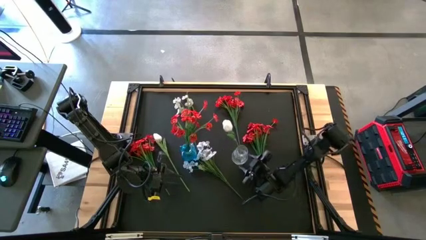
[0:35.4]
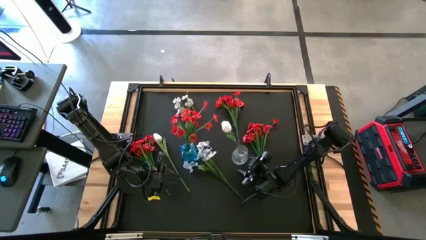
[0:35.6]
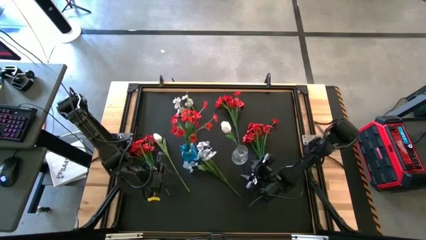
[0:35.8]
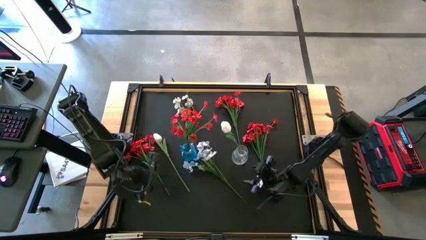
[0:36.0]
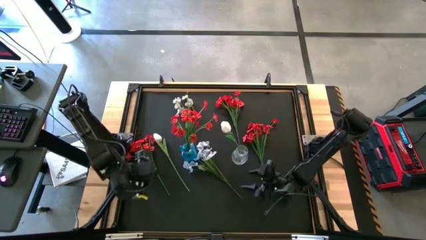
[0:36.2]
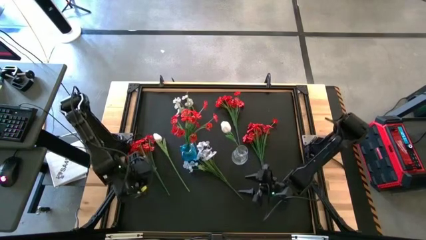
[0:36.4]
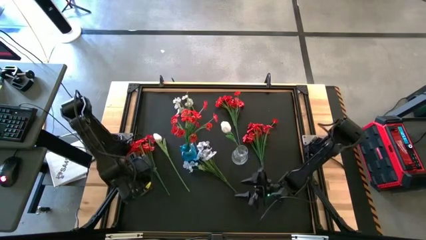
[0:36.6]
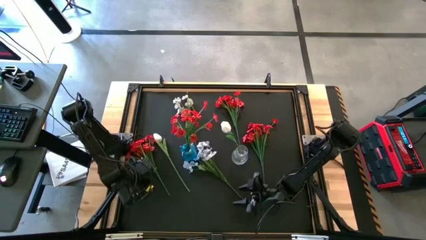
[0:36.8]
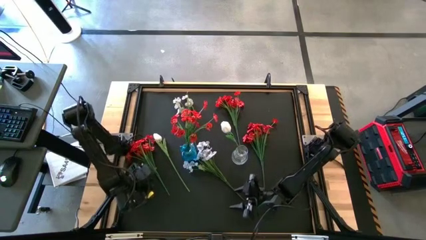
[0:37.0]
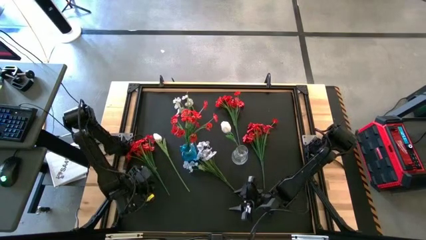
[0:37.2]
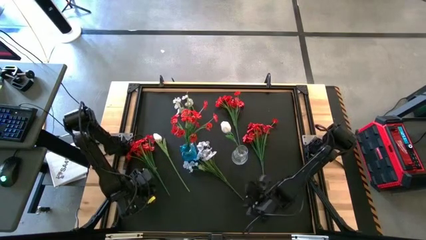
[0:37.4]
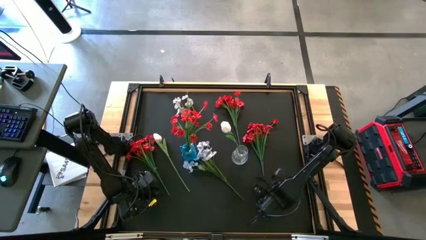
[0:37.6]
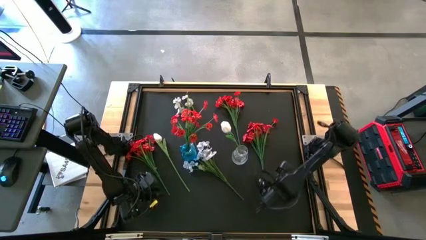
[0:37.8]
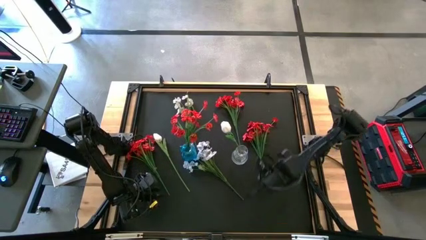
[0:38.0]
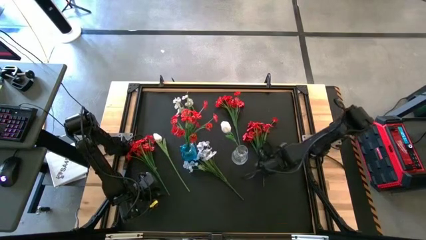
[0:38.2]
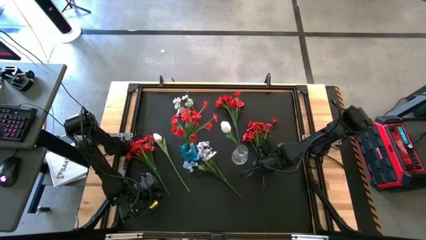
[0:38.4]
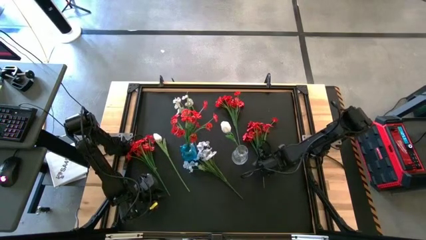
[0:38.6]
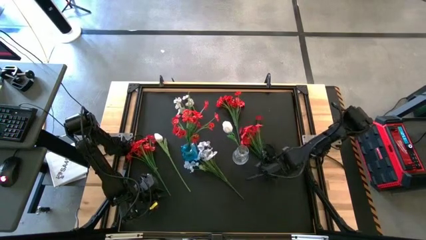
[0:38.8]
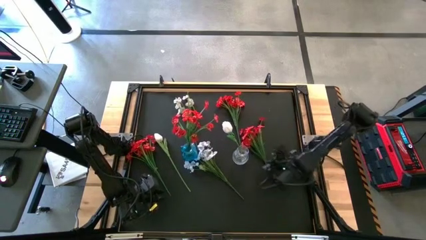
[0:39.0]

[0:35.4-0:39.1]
Task: Sort flowers into vase by color
Put the red flowers into the blue vase

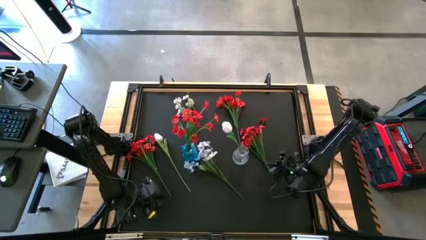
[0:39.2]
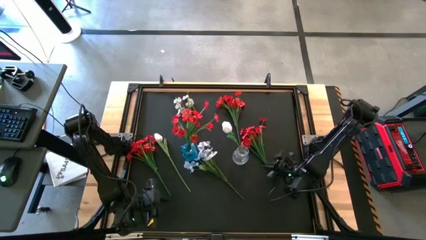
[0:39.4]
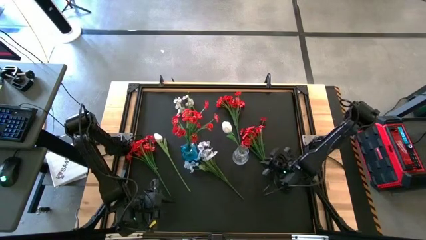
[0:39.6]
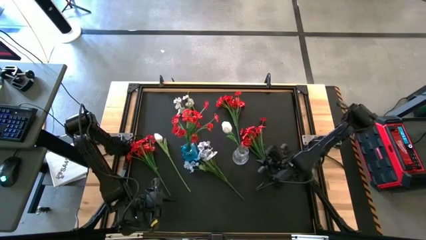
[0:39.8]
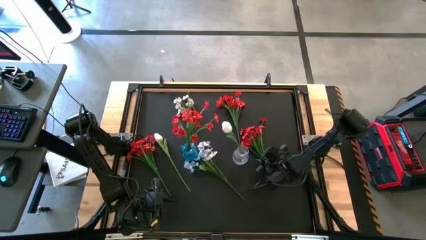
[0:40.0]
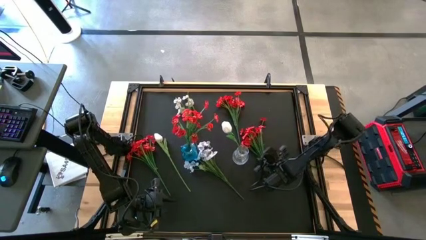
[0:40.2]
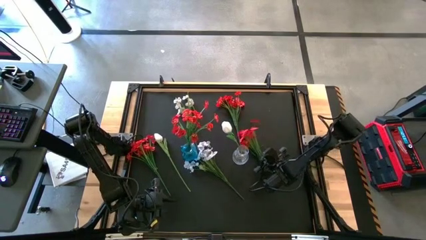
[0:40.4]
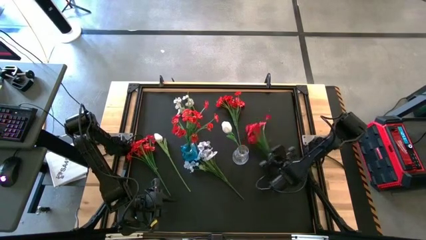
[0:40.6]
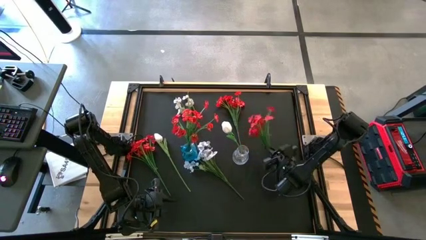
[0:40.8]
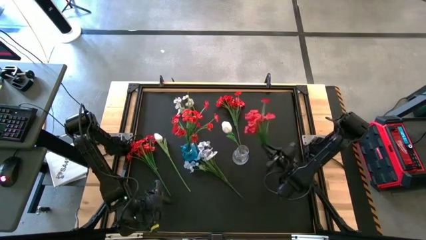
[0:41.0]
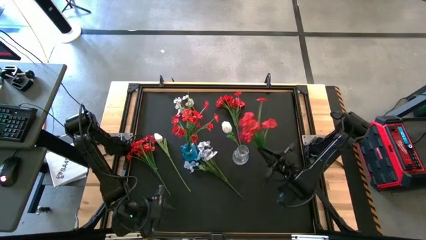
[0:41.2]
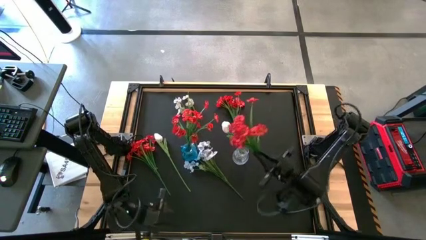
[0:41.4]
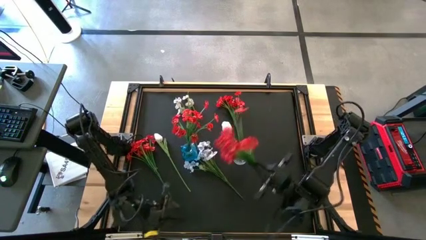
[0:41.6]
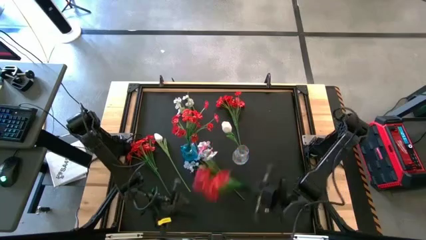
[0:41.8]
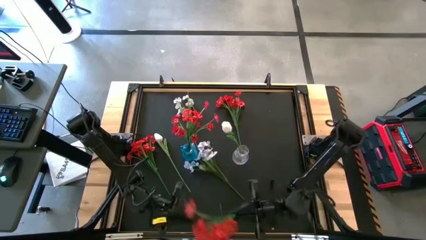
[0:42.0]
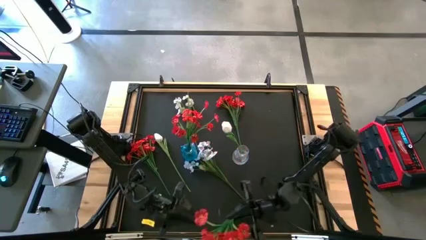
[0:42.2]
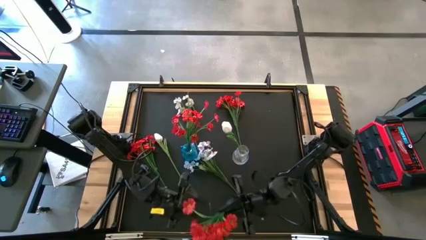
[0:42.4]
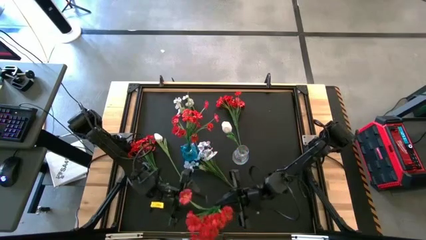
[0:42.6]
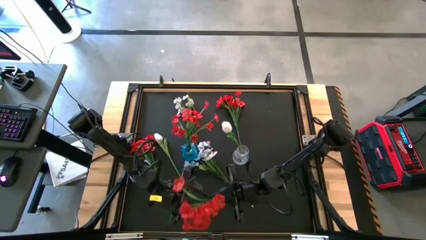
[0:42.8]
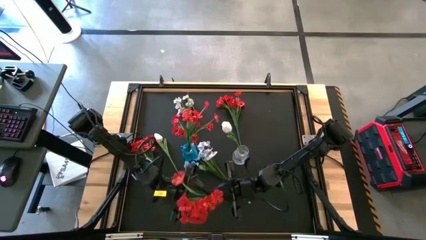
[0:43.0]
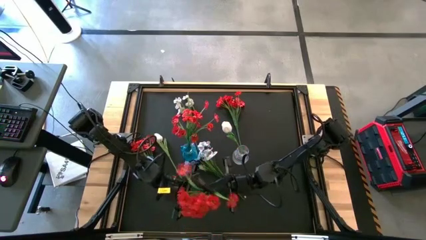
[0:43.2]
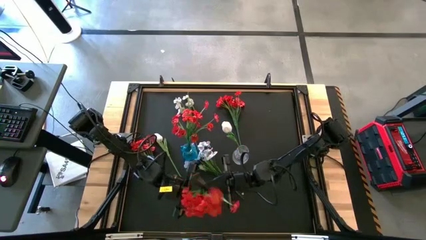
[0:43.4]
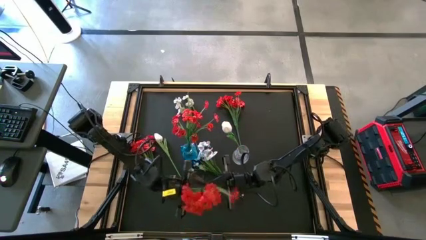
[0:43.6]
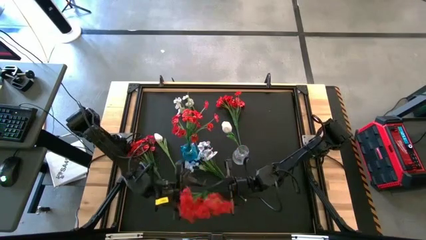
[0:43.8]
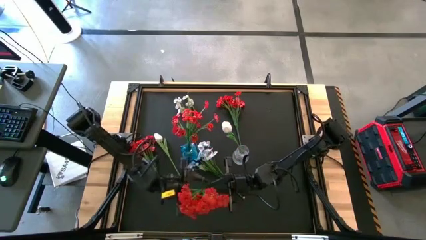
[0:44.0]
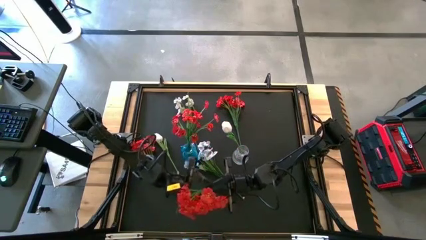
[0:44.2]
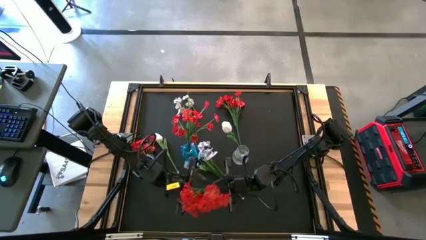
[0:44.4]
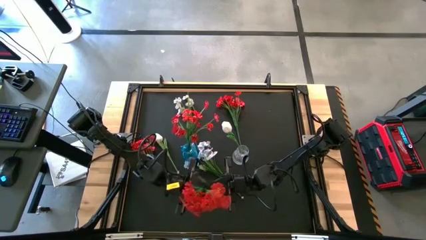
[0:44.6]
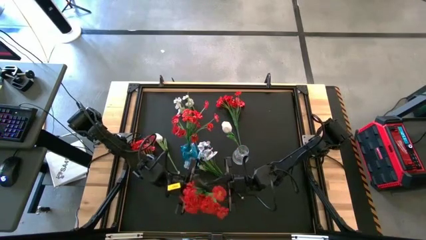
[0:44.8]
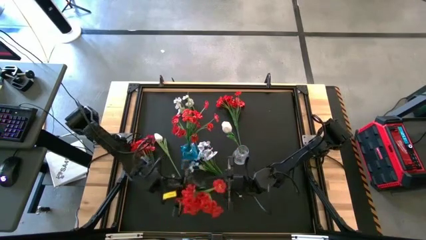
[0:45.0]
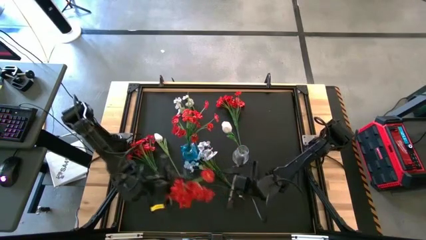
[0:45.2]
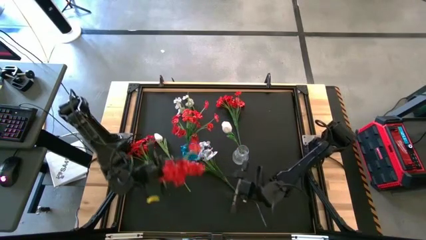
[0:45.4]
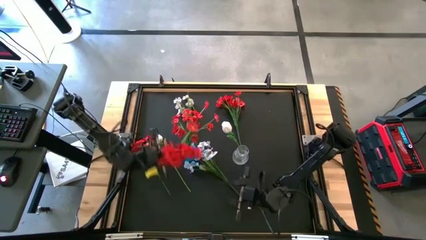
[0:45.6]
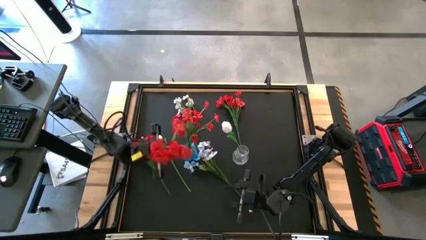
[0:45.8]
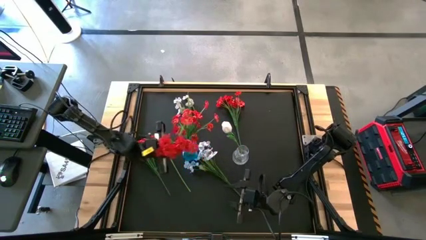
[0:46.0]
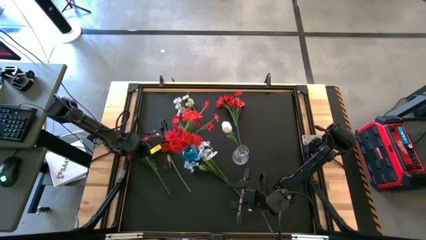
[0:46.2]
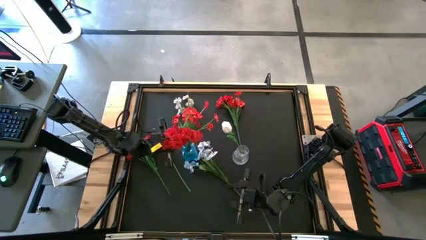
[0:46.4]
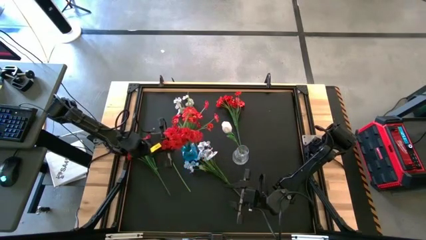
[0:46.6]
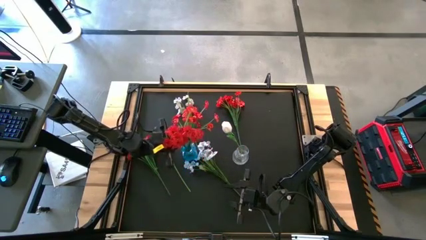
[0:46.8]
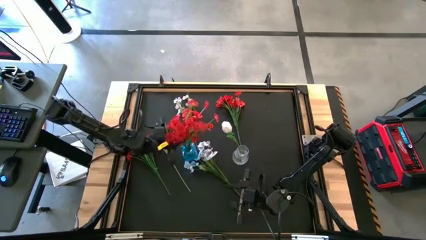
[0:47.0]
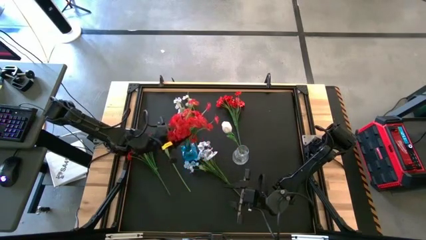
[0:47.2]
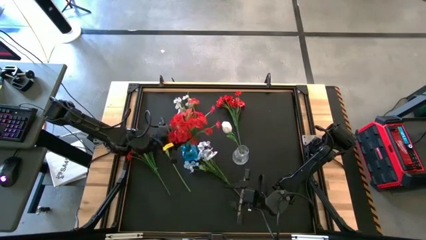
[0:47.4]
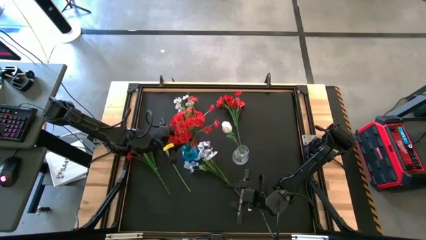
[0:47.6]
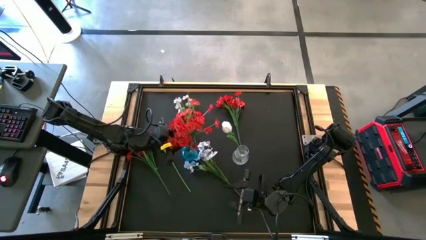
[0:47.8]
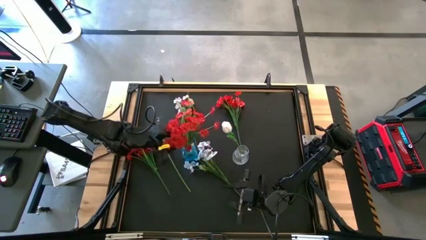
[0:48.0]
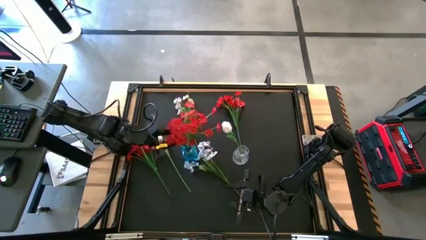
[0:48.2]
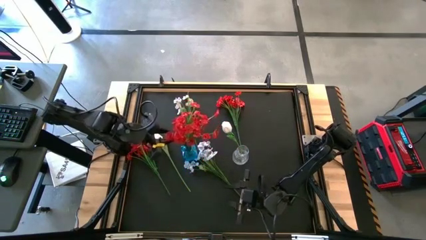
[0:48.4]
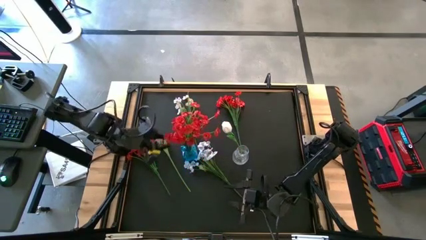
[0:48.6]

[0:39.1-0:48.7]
Put the red flowers into the blue vase

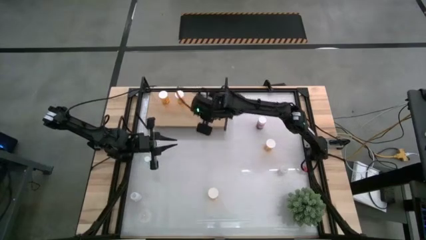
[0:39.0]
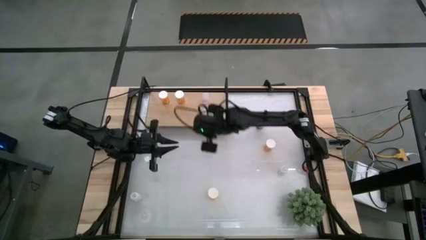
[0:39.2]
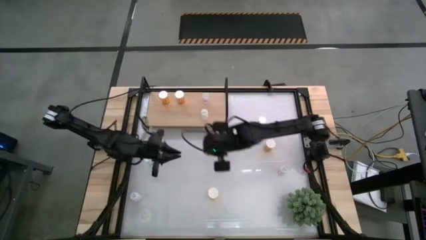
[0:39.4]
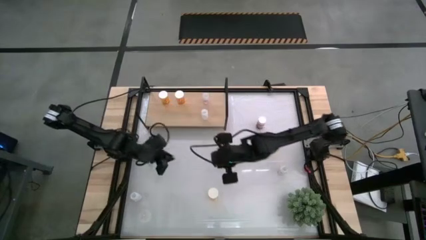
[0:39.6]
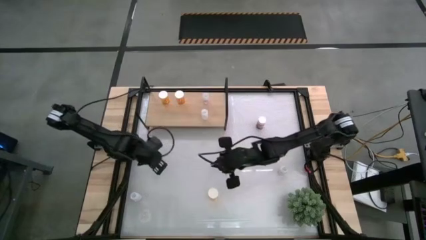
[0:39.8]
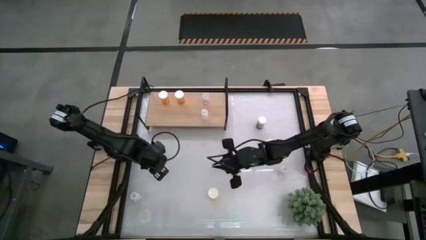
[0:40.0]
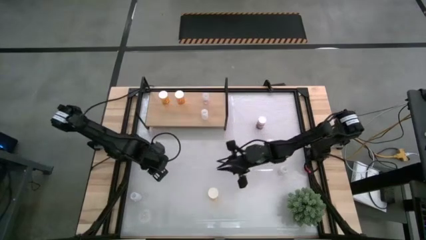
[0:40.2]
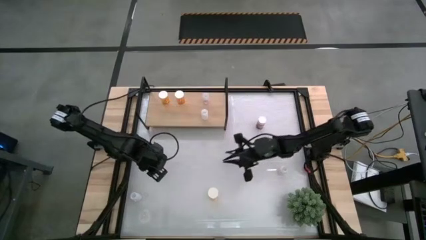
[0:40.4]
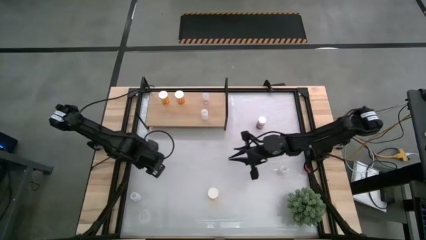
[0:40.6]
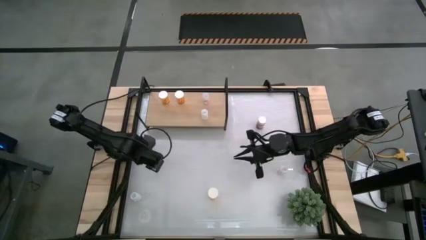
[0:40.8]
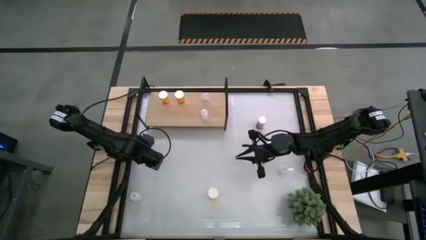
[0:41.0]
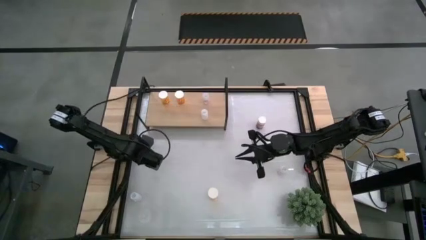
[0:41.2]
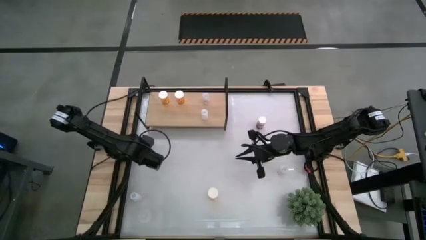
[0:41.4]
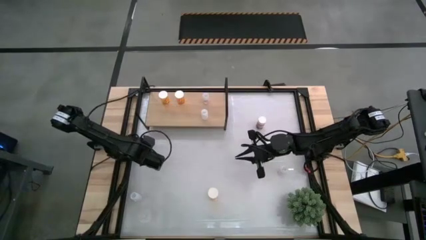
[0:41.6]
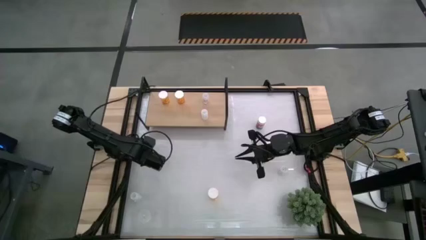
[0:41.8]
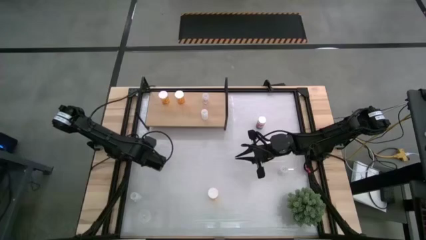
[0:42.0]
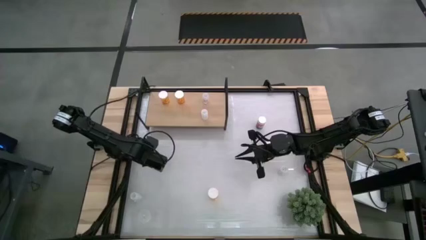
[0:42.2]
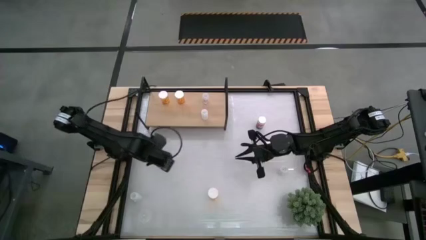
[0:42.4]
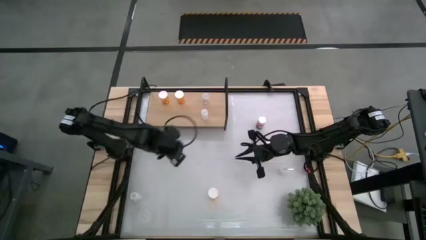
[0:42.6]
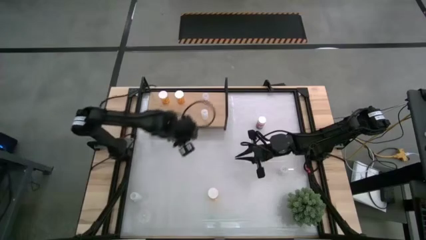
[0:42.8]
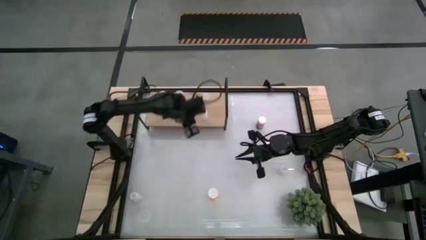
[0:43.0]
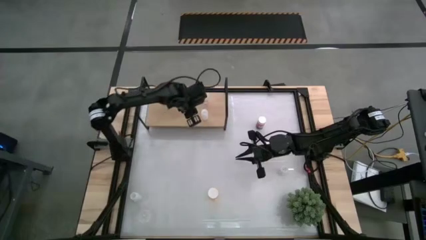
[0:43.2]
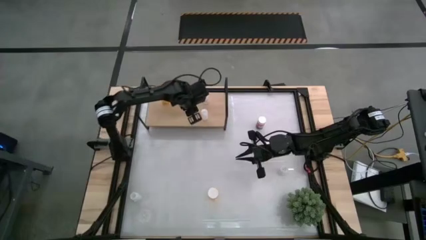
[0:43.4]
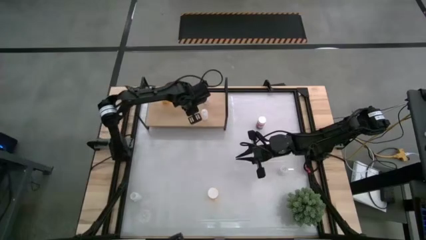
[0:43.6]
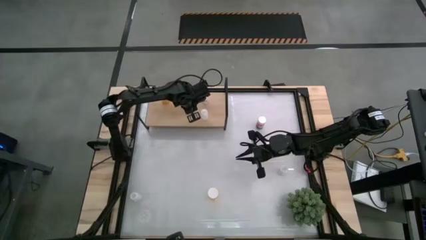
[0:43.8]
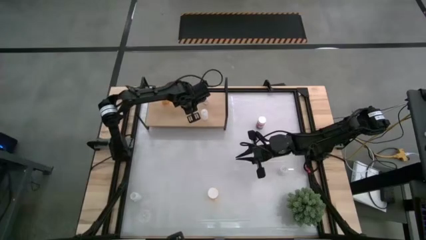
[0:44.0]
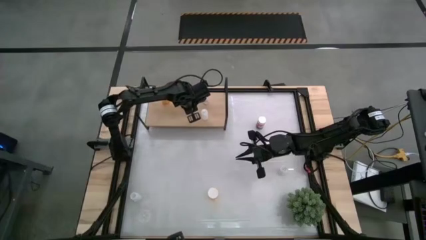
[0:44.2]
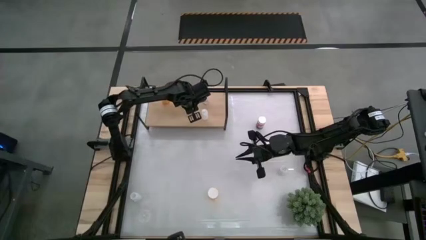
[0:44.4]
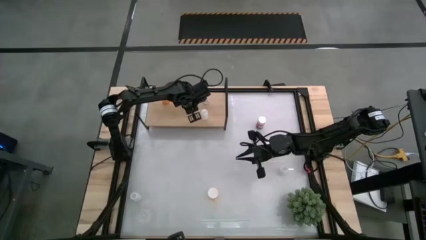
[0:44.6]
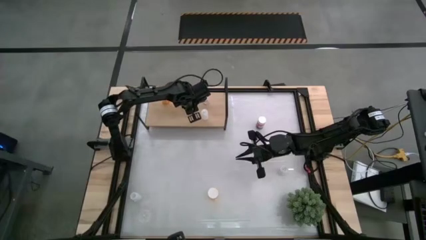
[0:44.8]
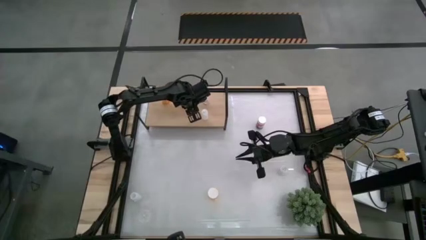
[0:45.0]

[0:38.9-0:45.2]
Task: Pick and place medicine bottles onto shelf by color
Put the small light blue pill bottle on the shelf
